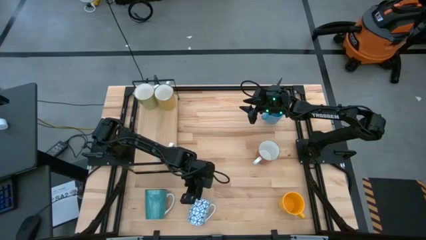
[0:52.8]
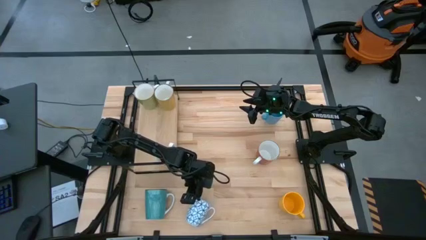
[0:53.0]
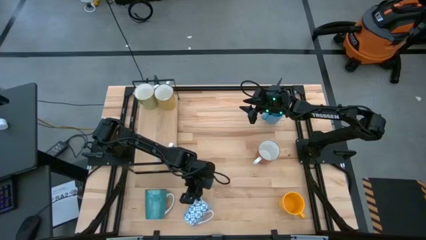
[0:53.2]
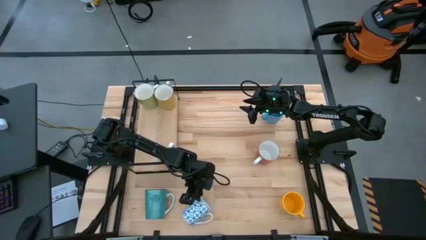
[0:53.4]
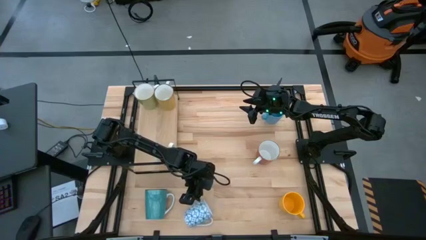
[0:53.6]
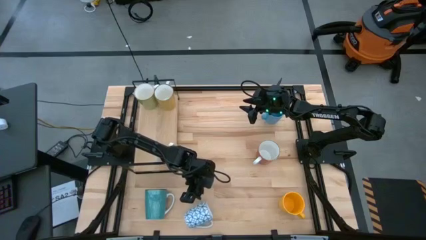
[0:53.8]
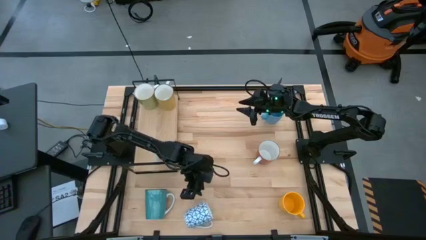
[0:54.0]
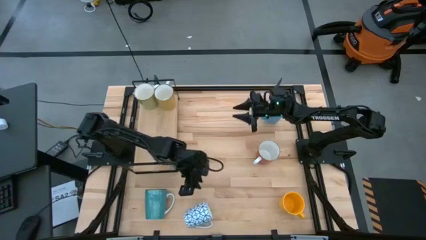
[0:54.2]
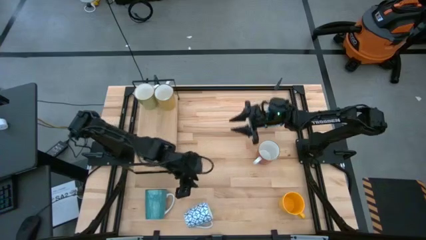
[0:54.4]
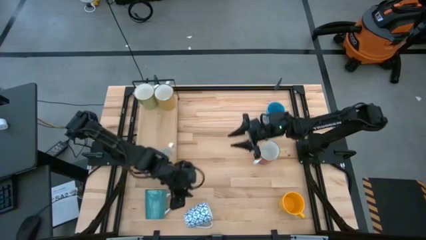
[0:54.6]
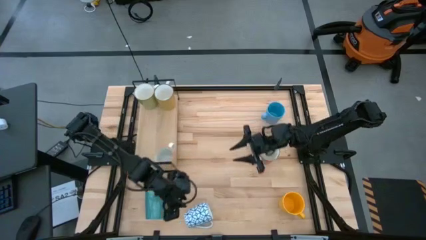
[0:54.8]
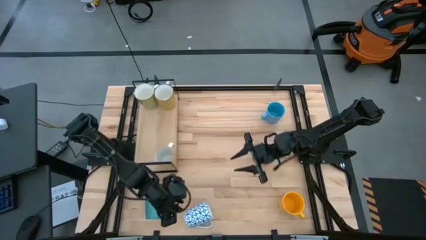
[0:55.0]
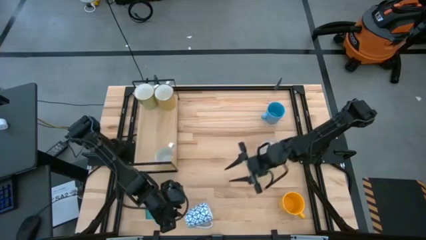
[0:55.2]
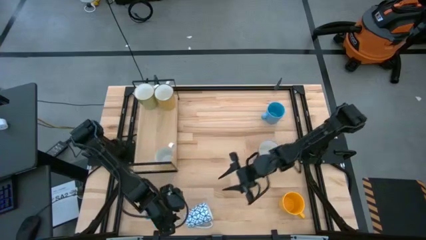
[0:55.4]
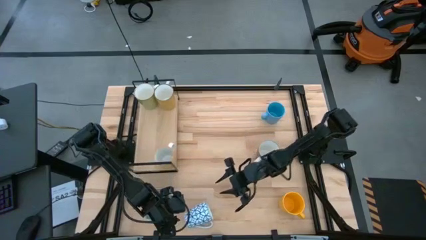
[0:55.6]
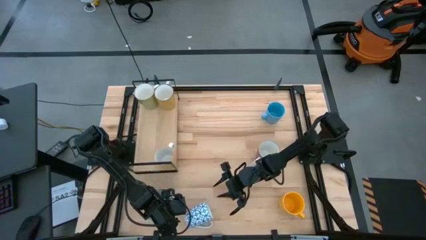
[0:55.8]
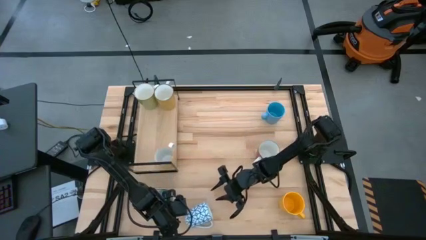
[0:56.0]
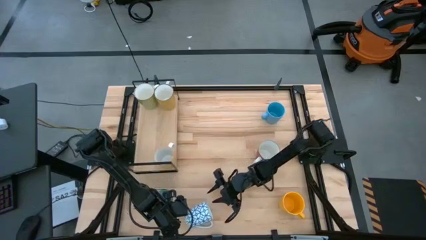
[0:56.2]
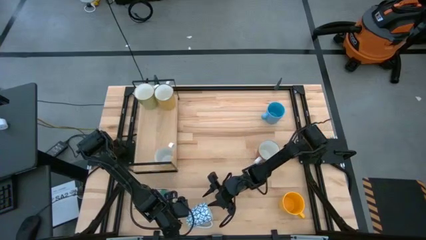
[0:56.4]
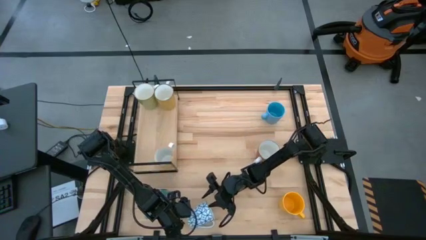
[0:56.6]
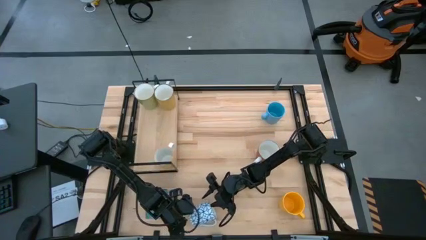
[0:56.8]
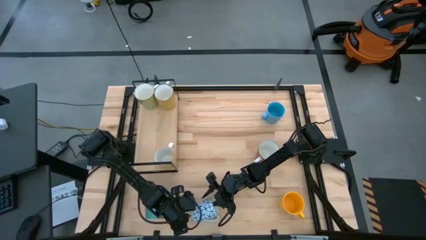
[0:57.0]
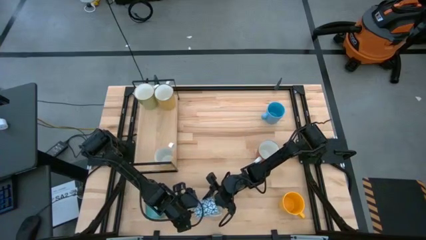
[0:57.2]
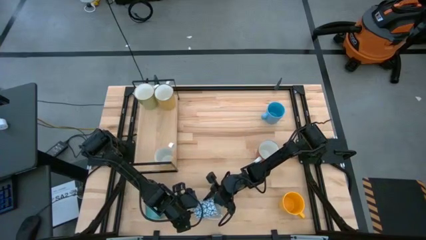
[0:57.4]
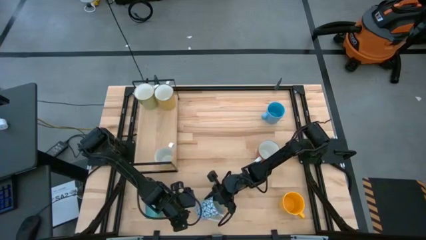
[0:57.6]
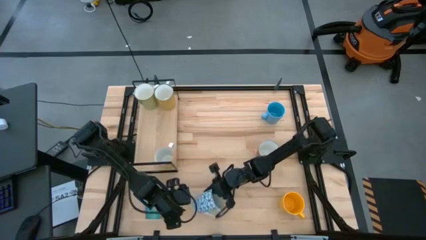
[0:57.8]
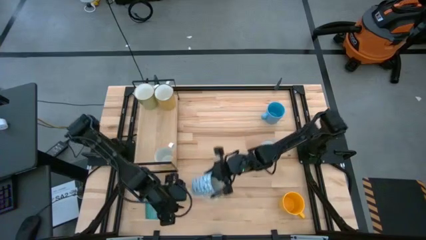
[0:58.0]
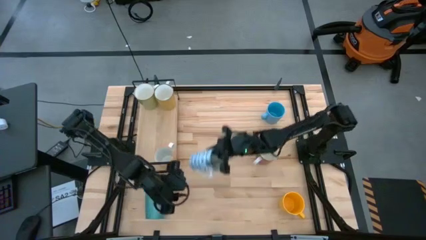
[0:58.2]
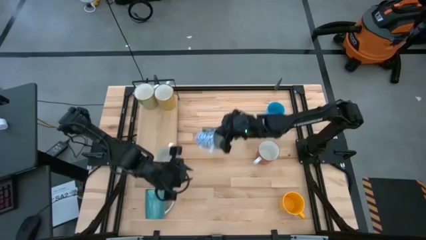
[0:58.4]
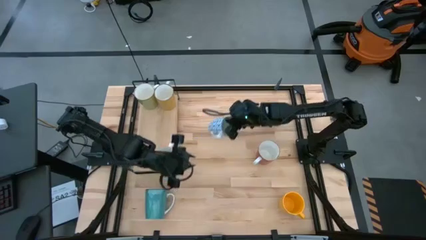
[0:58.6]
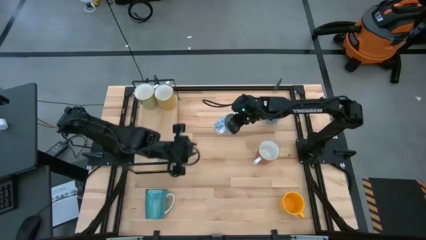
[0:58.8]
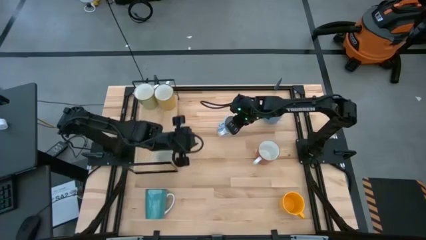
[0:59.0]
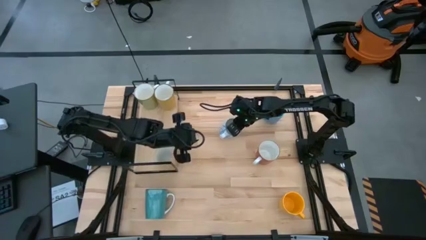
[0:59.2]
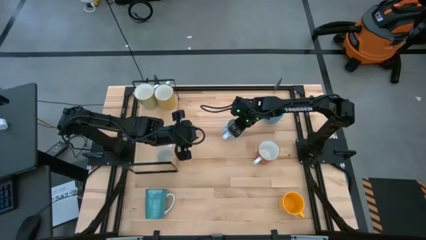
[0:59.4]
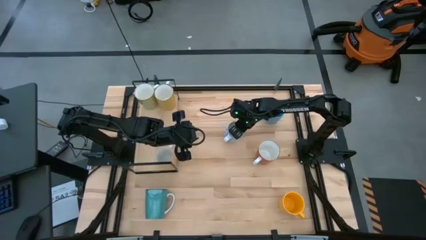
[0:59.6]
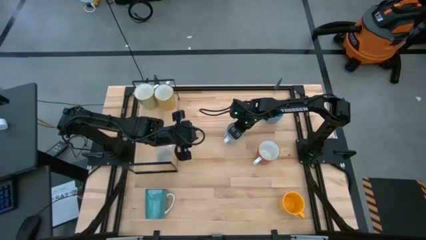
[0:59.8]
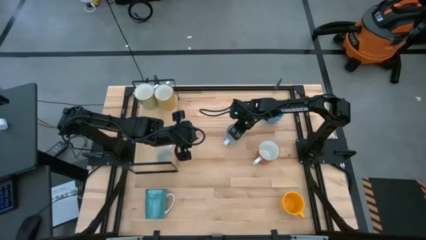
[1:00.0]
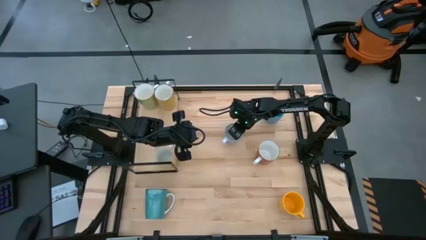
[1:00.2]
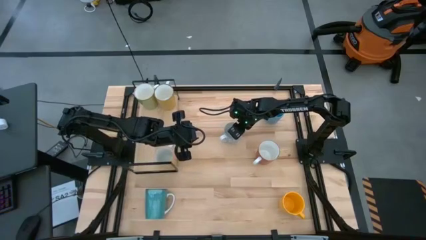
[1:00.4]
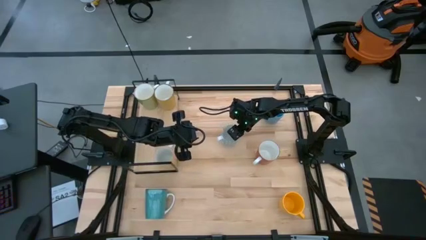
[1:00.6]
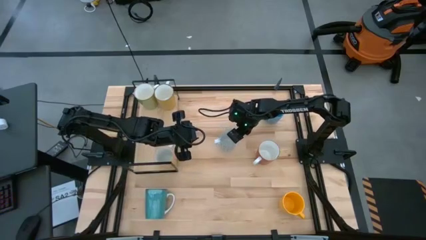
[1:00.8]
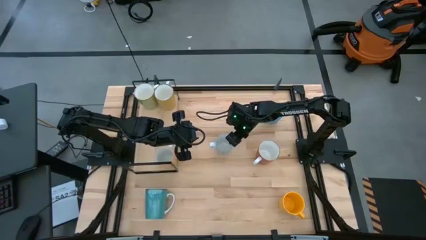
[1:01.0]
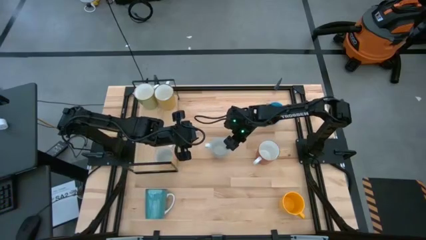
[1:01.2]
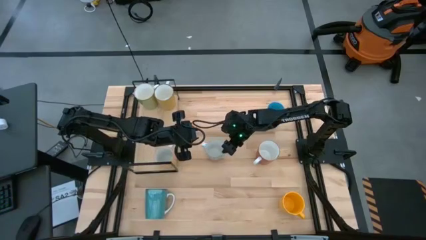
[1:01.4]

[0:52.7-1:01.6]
Task: Place coffee mugs
Move the blue patterned mug to the center of the table

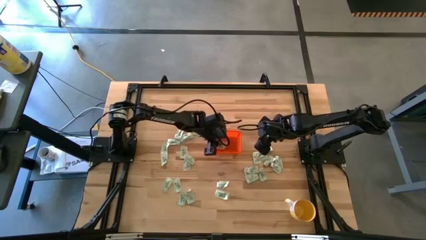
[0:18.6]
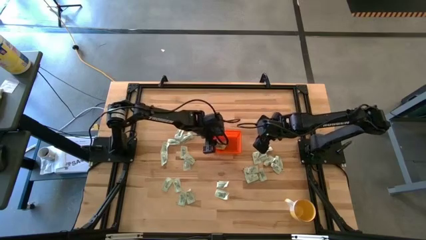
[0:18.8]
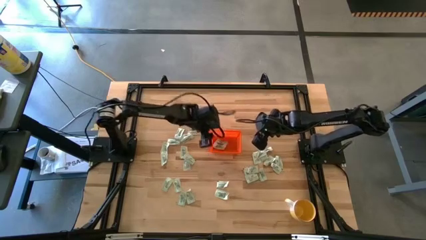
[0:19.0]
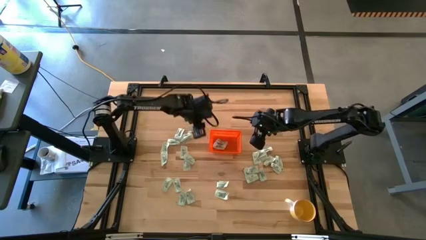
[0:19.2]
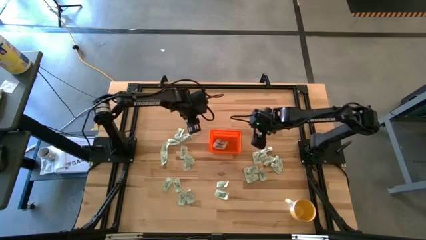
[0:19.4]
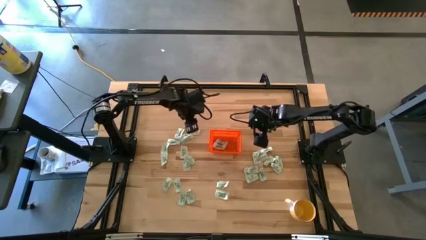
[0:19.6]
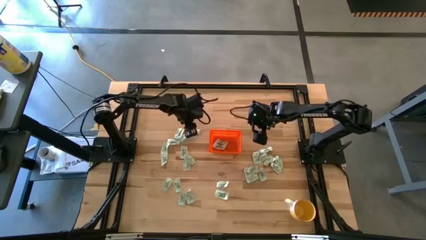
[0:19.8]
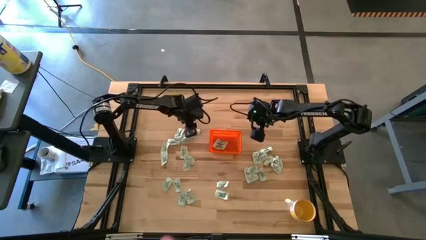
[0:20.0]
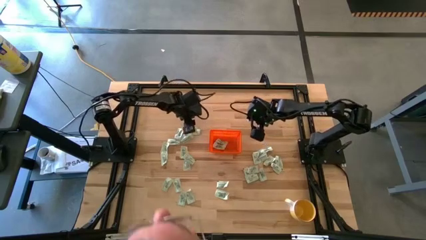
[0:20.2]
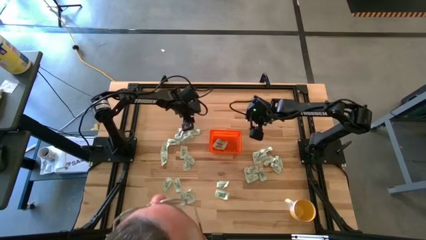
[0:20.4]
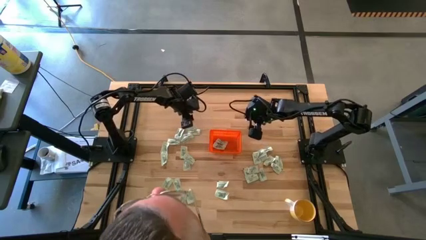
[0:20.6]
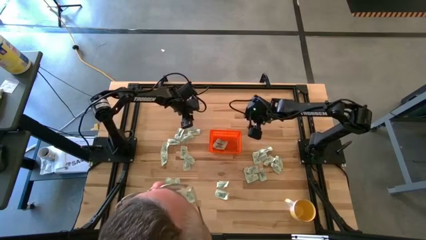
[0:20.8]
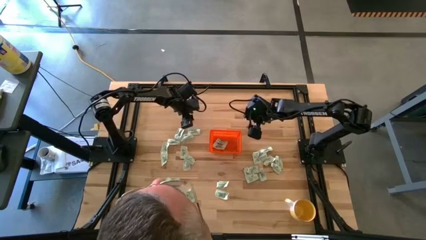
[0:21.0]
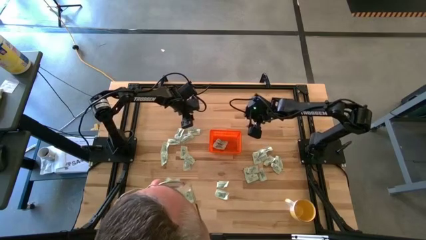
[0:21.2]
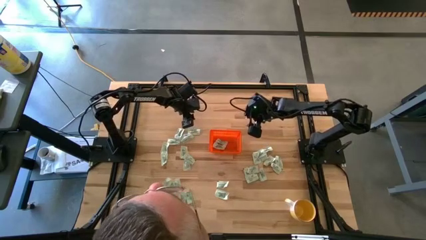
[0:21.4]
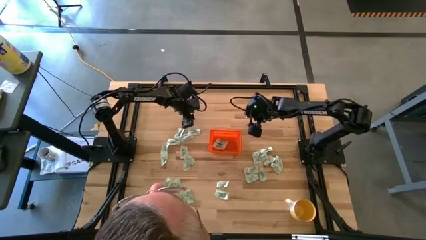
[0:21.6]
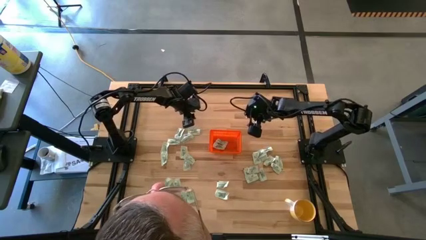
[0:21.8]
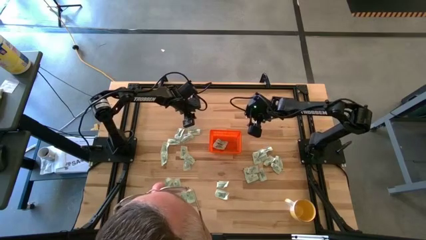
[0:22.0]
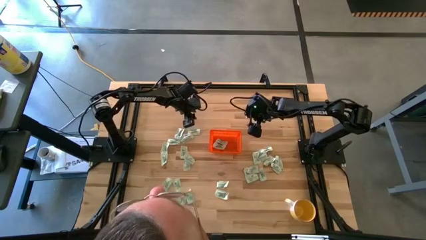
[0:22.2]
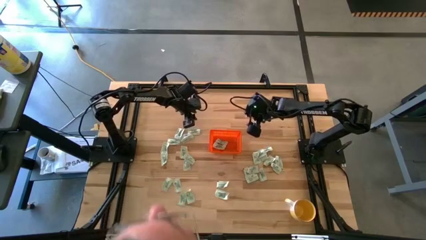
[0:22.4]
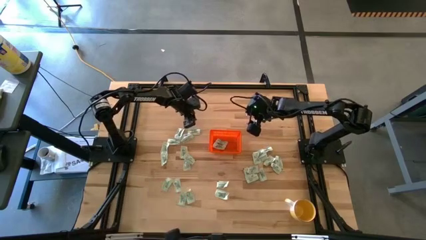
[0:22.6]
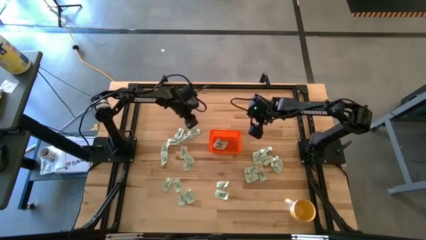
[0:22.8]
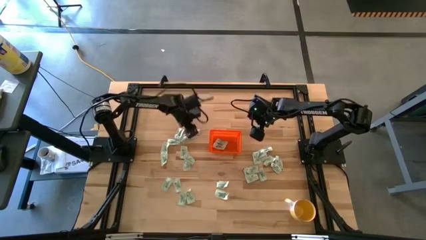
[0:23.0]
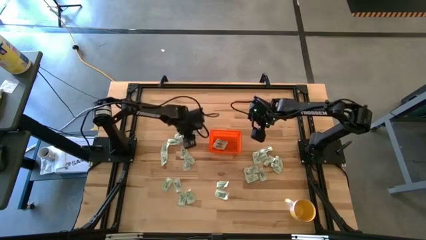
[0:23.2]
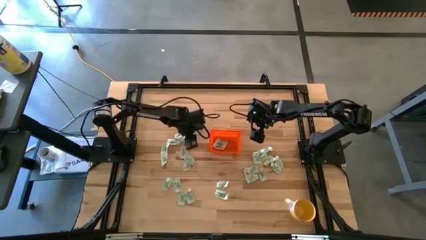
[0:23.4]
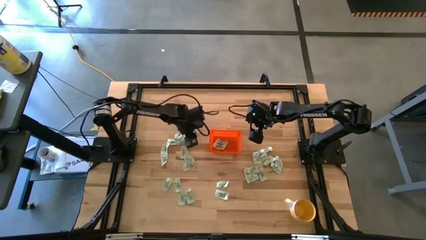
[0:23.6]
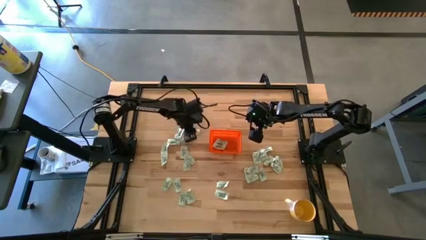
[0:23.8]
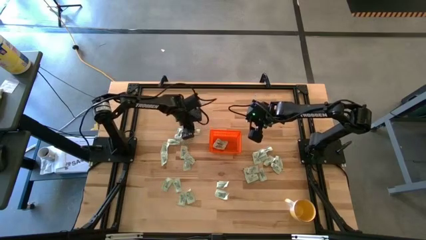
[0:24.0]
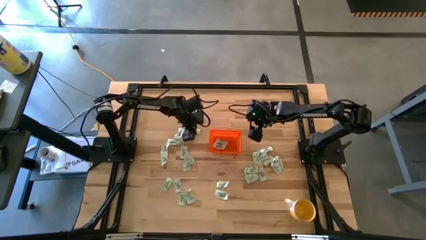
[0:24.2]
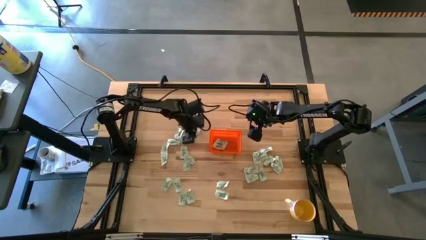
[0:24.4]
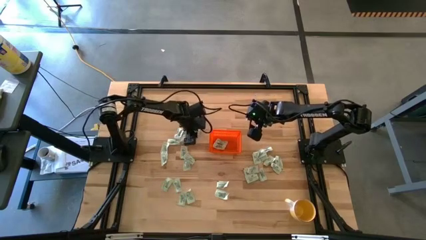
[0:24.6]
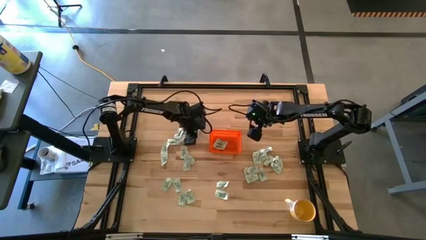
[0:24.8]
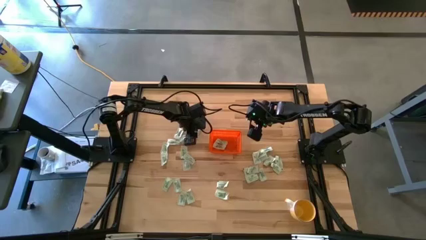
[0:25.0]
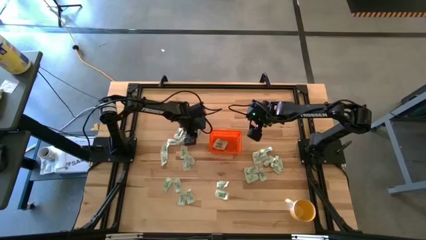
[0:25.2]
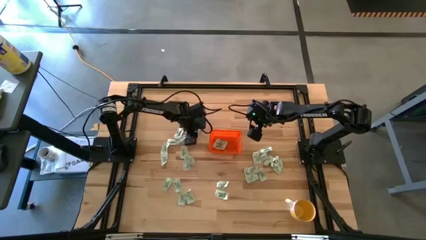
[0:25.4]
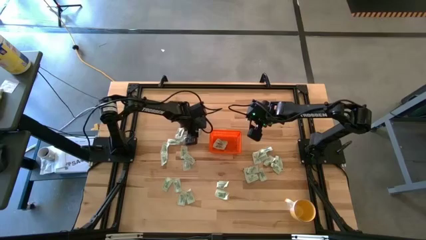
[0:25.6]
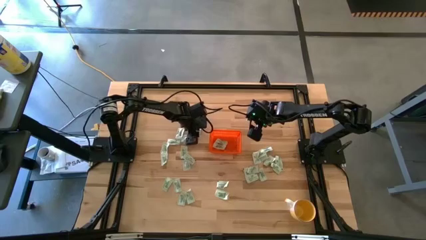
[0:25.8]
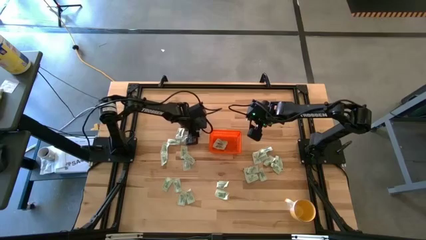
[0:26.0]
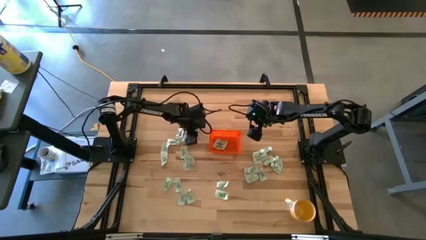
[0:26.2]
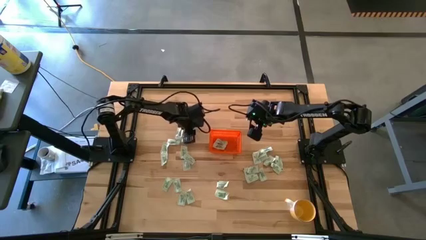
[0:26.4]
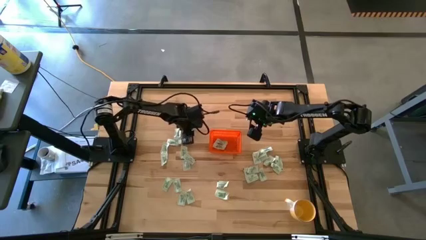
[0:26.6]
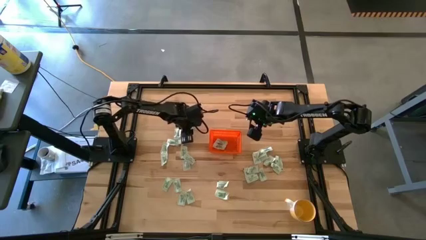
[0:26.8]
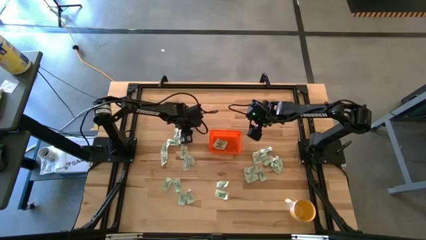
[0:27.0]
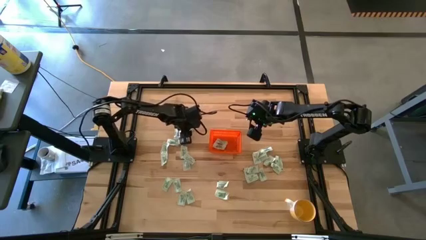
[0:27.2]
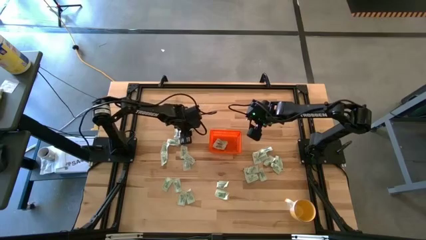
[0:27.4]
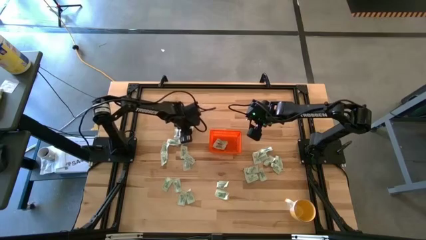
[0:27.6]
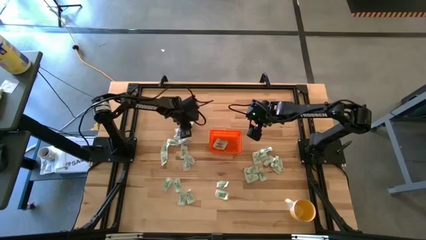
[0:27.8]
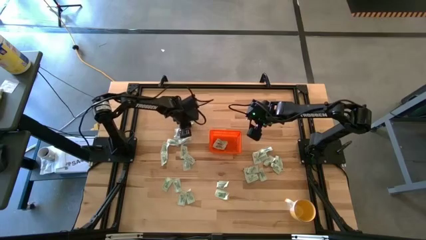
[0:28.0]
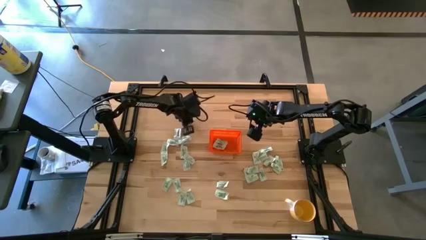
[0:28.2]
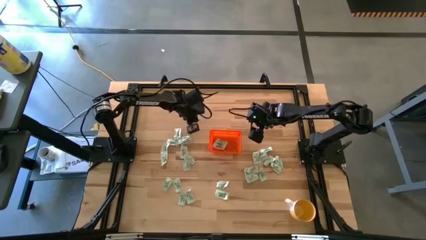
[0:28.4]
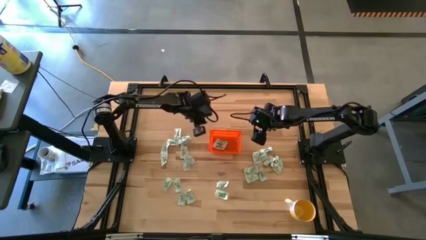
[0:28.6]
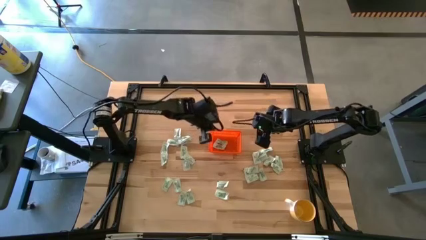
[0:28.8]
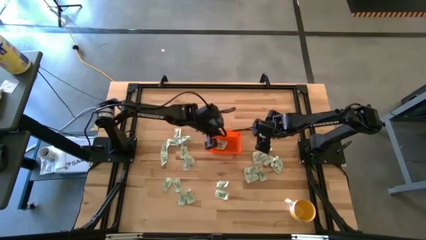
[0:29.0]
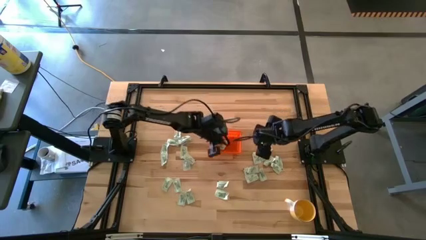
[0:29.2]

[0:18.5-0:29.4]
Task: Pick and place Stevia / Truvia into bins
Put the light green stevia packet into the orange basket
